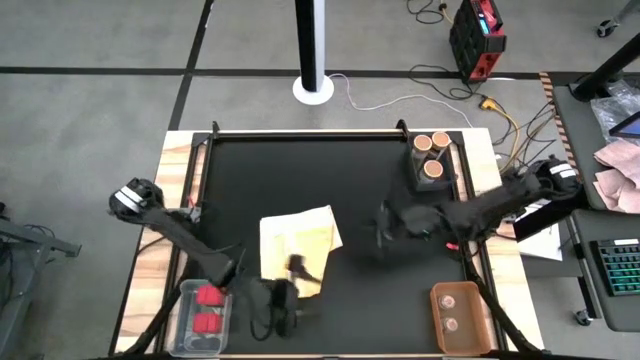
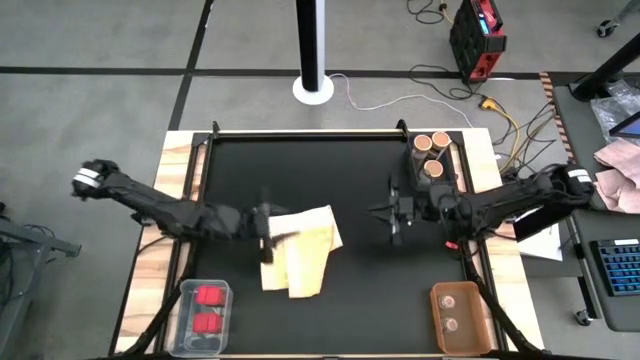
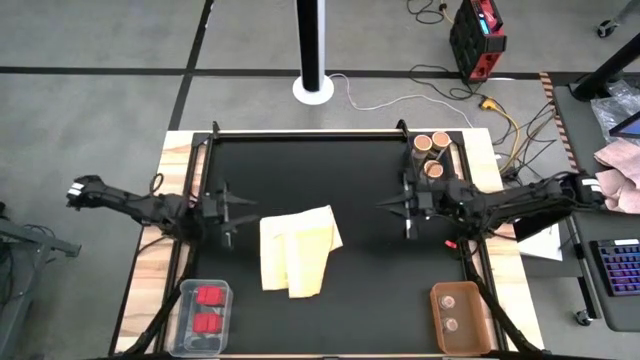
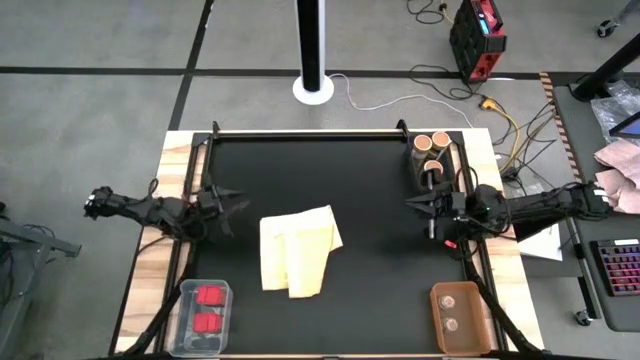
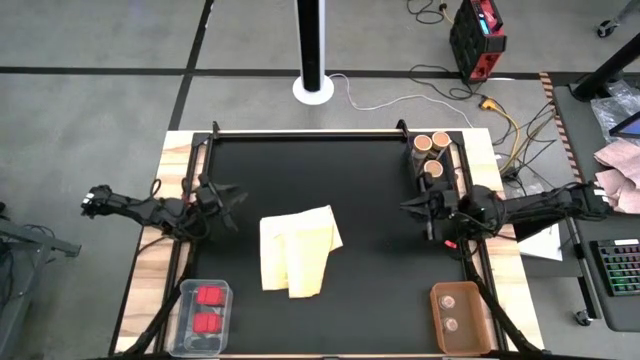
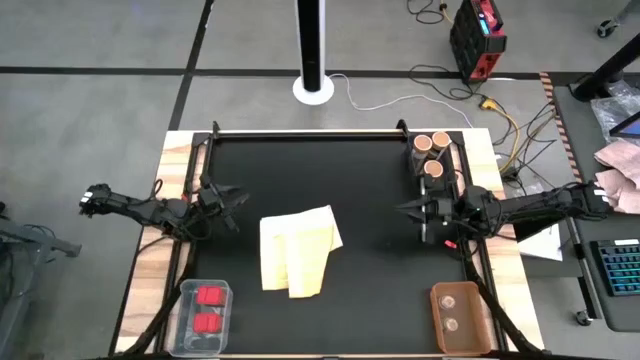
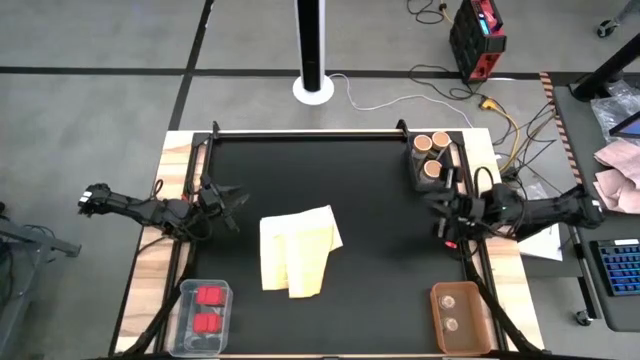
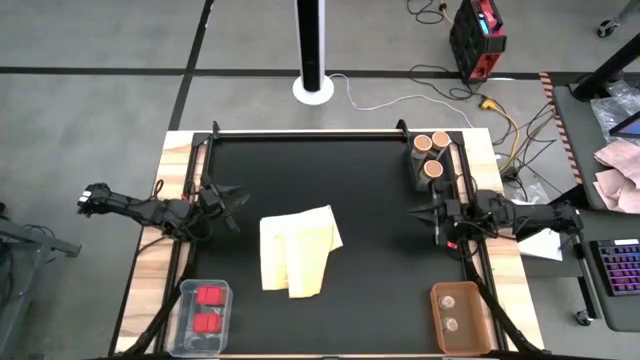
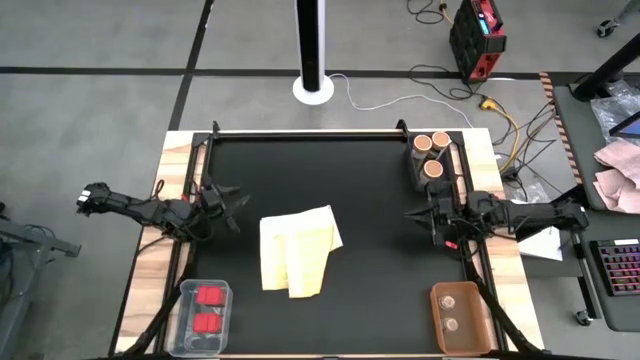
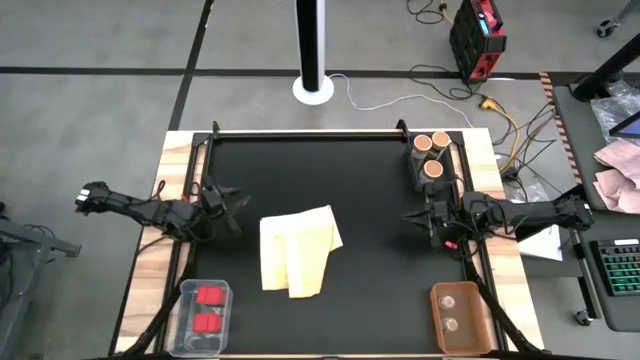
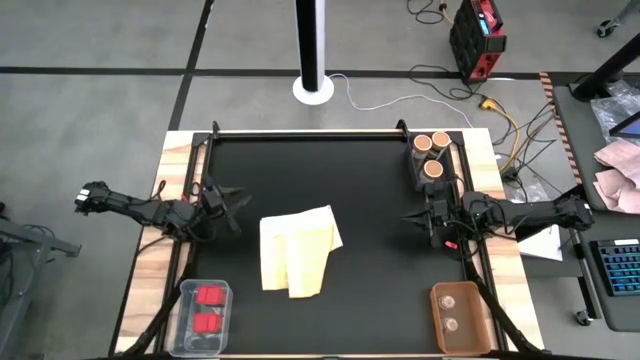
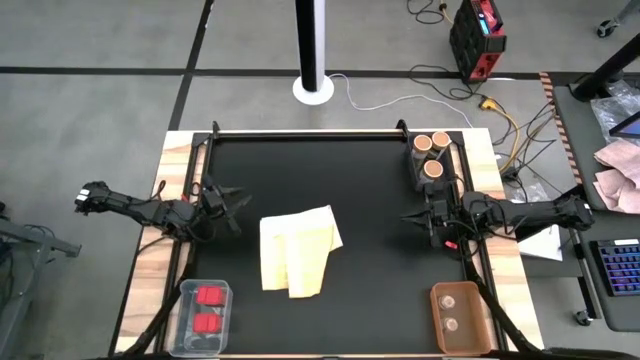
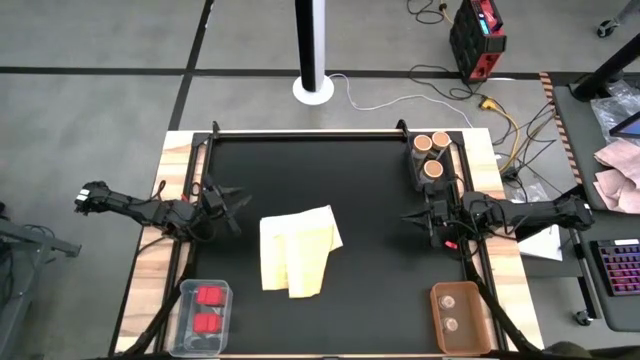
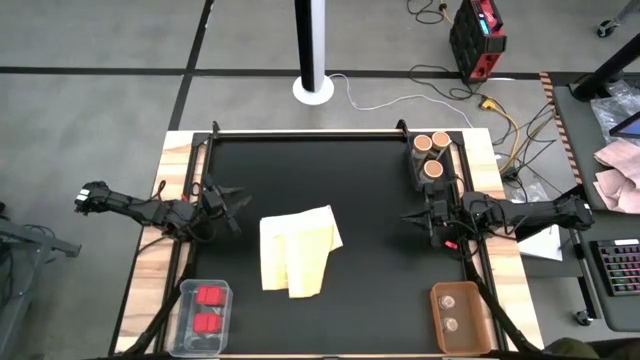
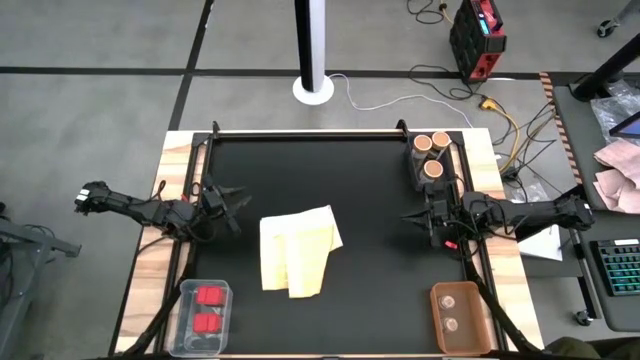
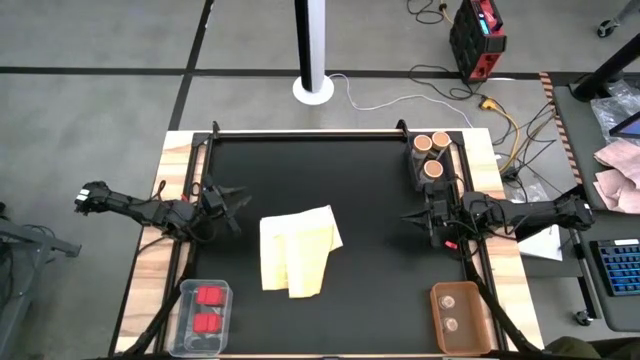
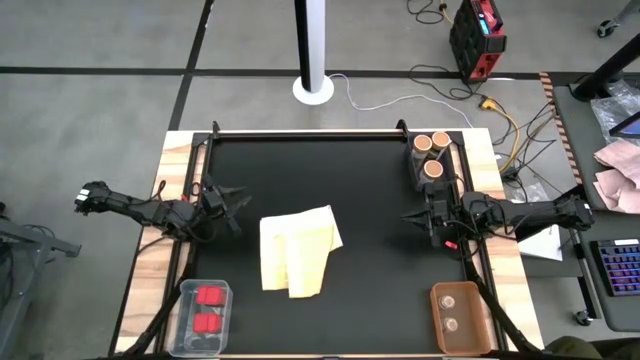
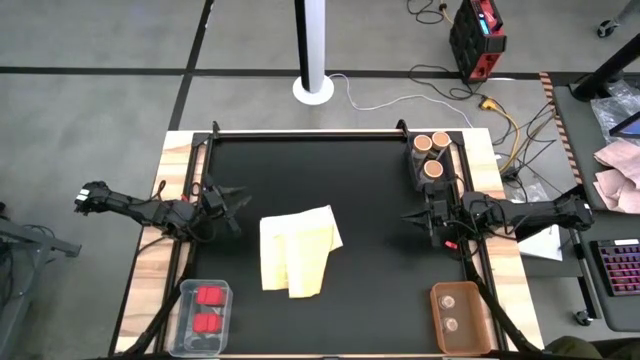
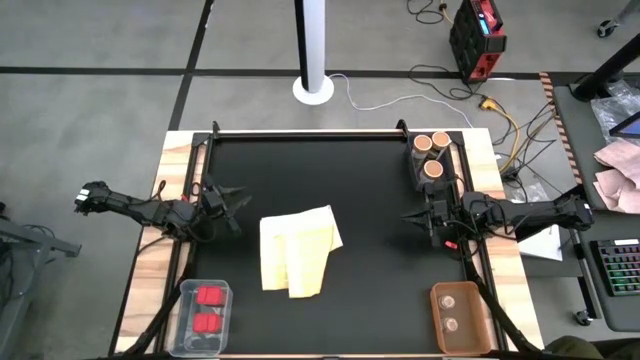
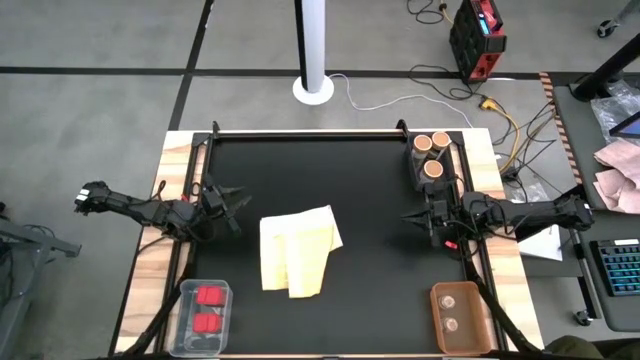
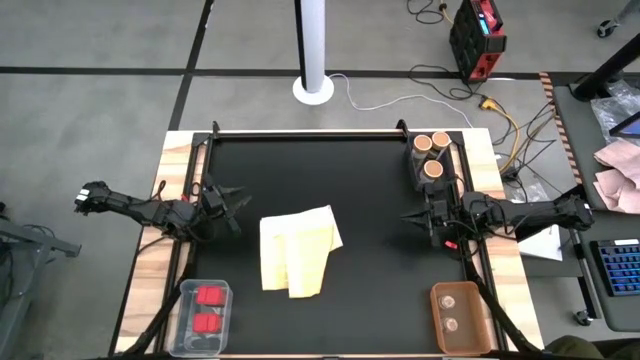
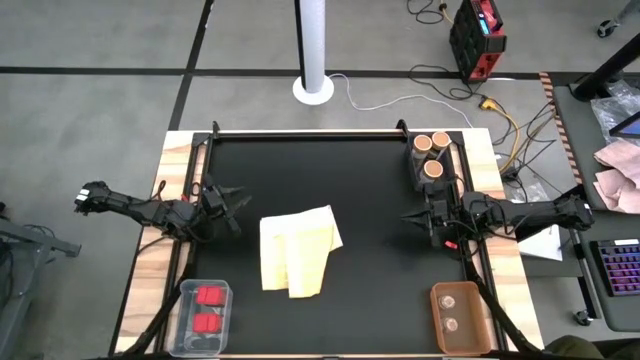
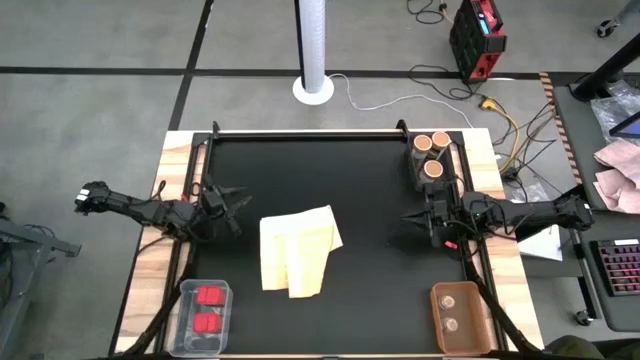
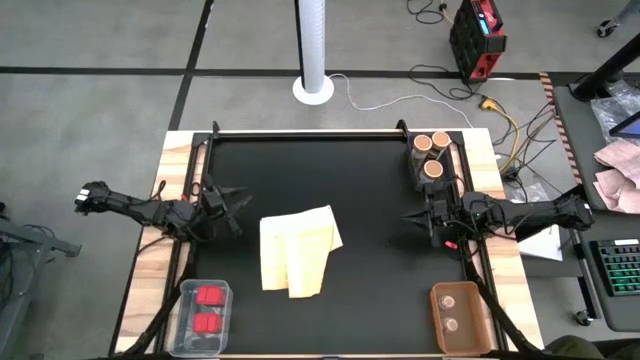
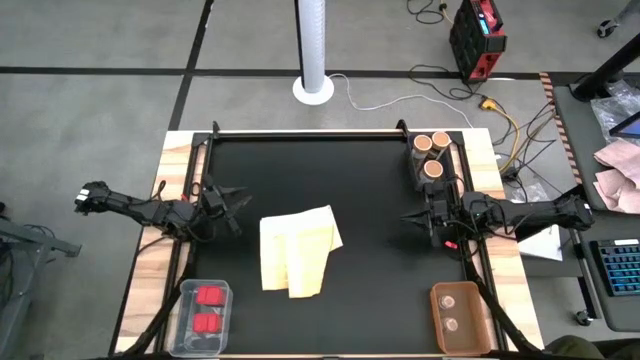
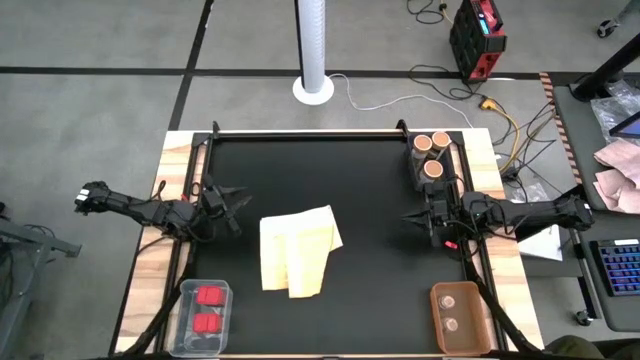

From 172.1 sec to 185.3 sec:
Task: Sort spices by type
Return to Home Position

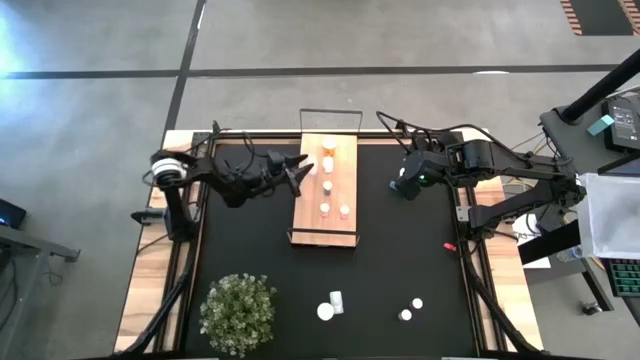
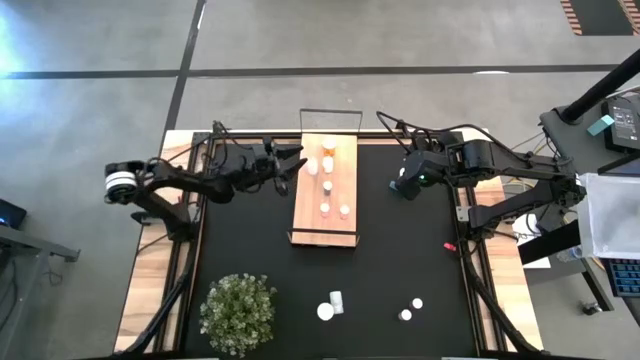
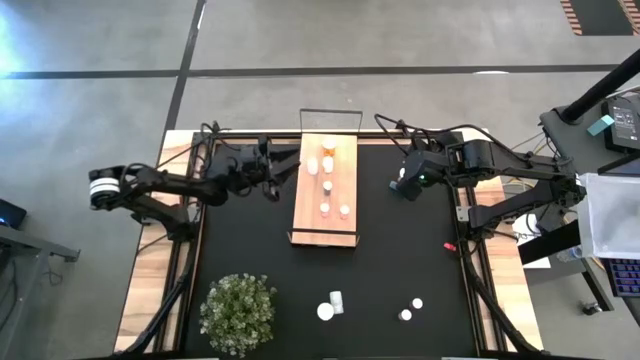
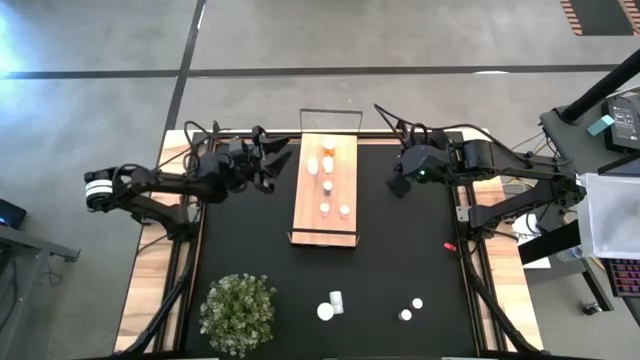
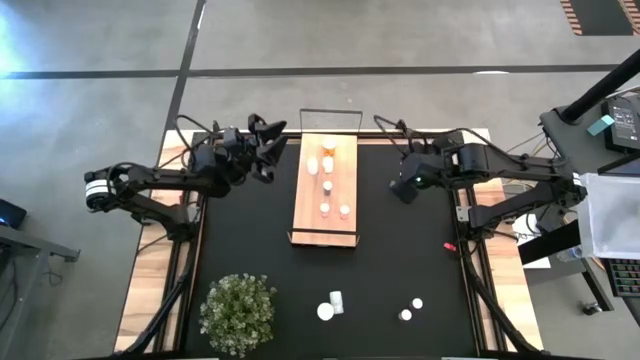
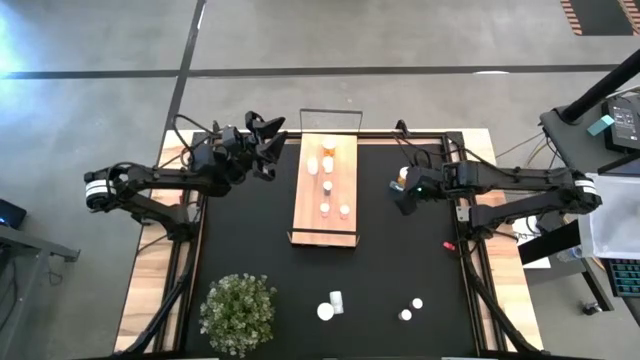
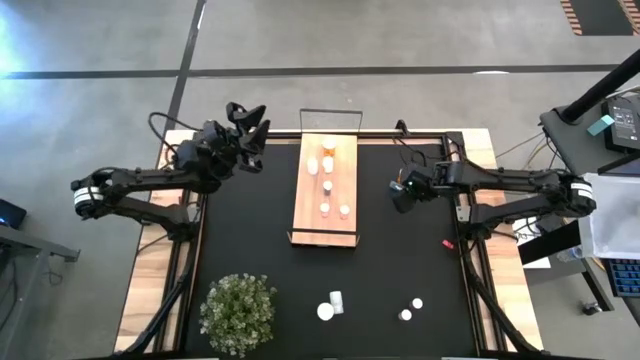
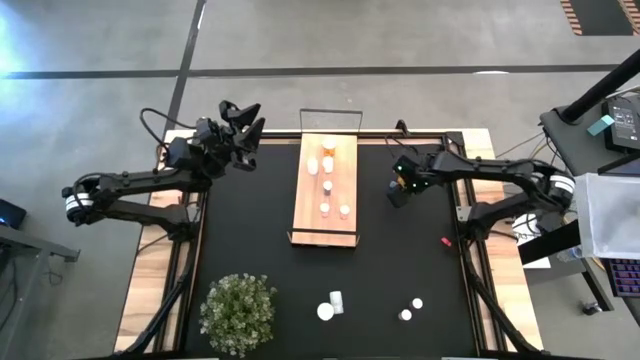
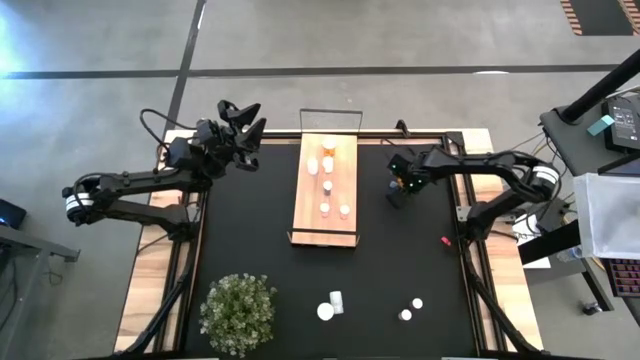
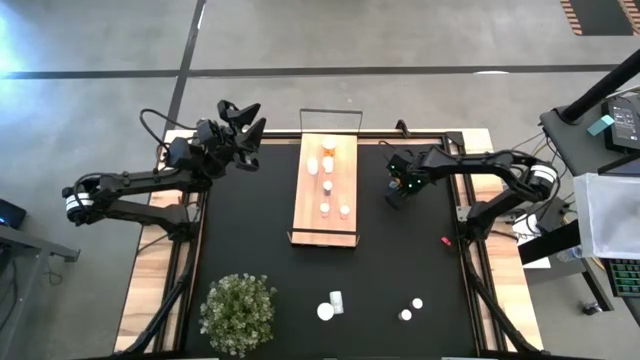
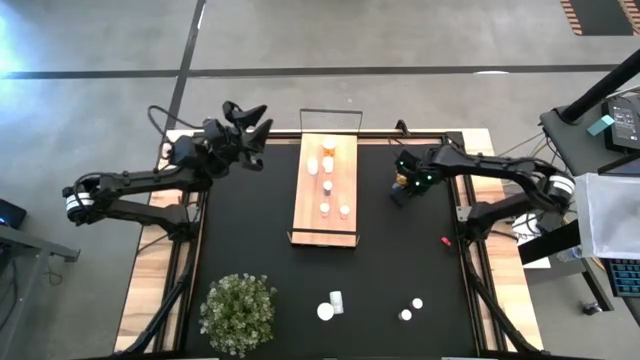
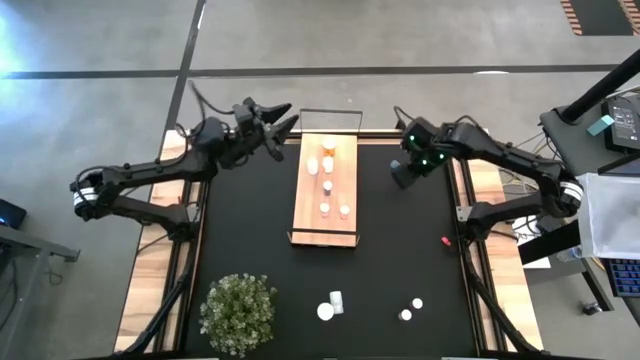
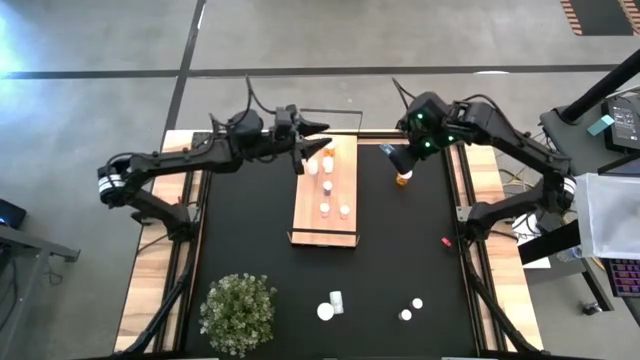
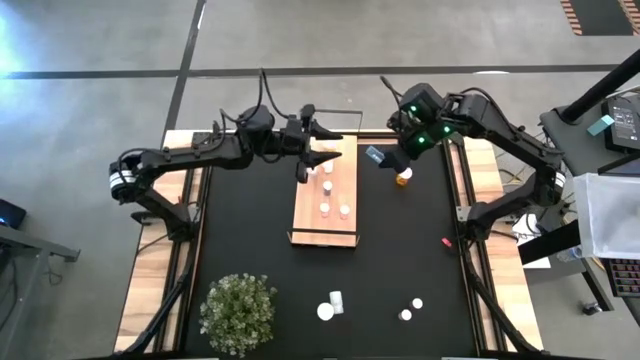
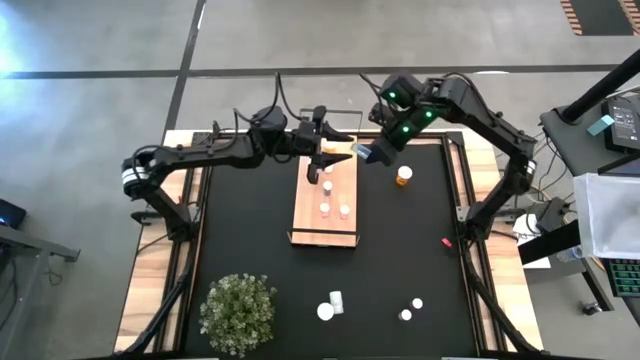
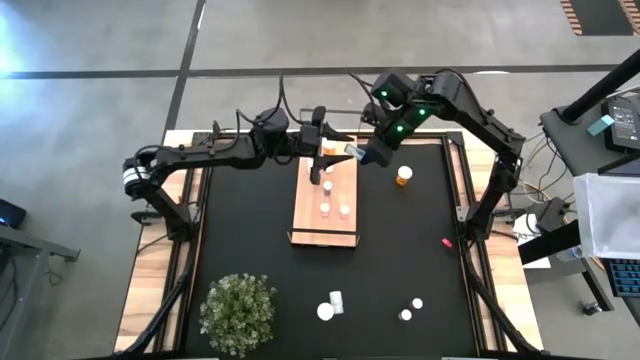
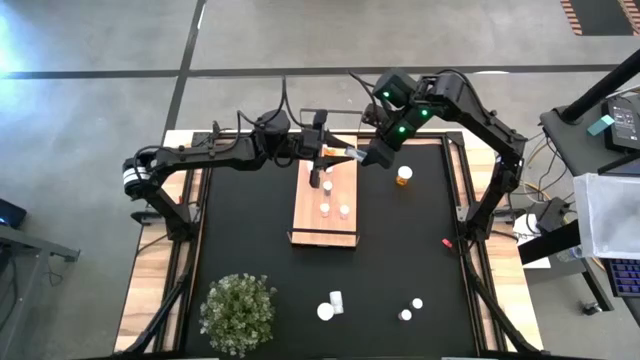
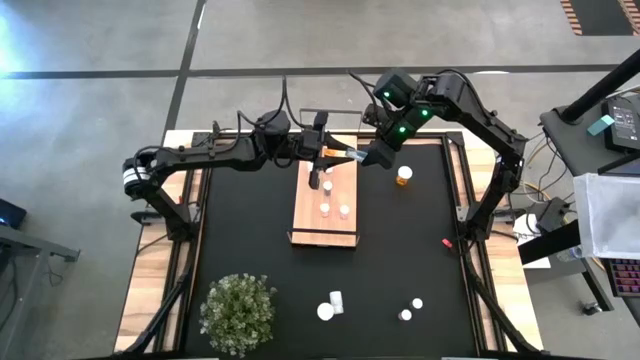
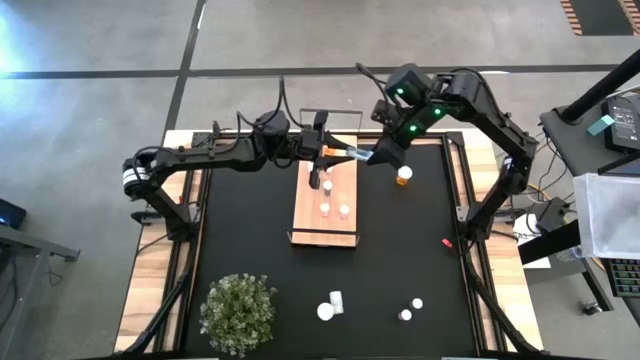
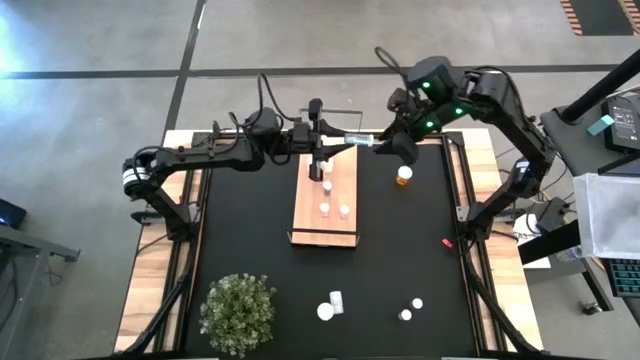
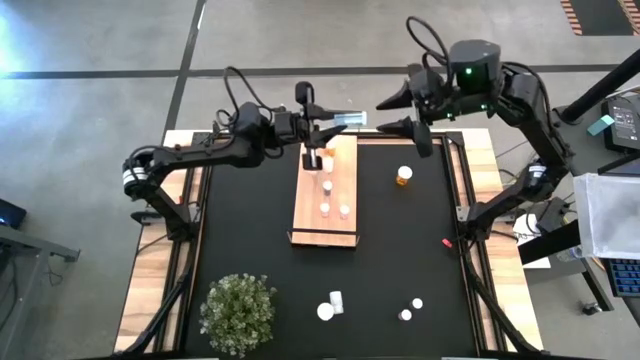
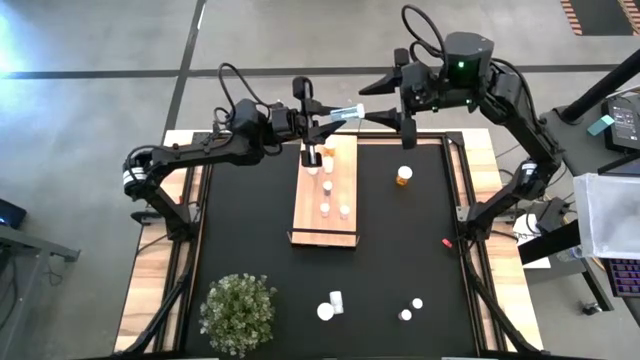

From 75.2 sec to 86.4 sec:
Task: Pick and place medicine bottles onto shelf by color
Put the top blue pill bottle on the shelf aligned with the other blue pill bottle
